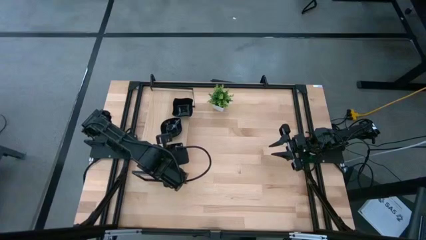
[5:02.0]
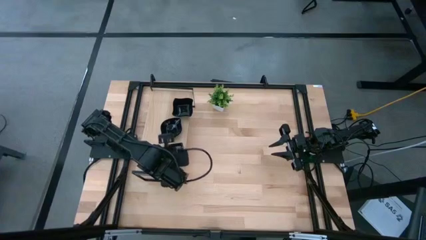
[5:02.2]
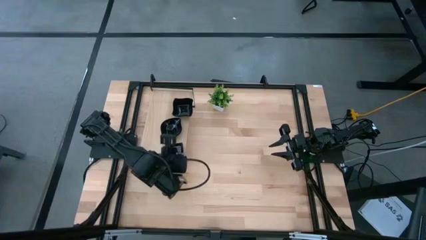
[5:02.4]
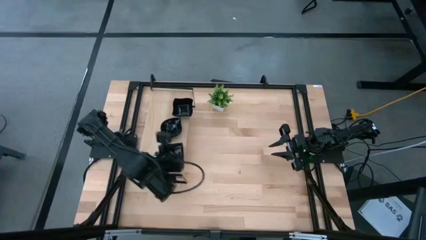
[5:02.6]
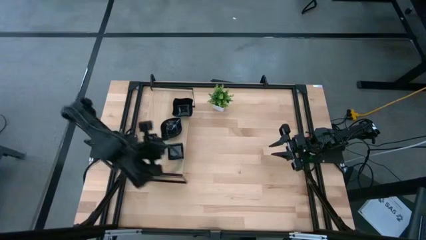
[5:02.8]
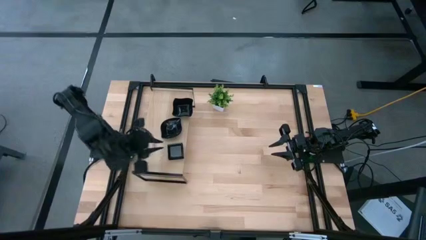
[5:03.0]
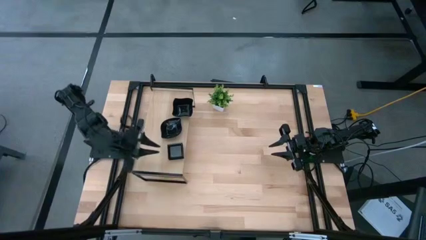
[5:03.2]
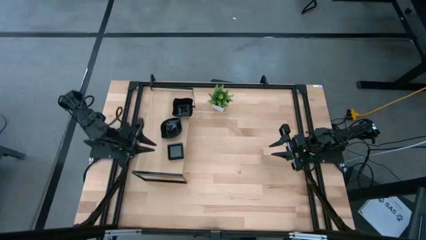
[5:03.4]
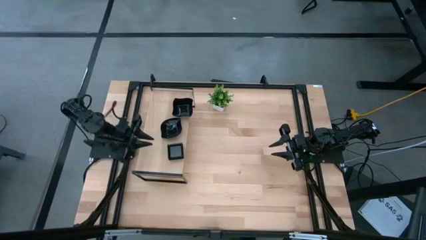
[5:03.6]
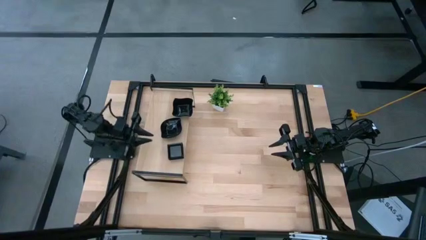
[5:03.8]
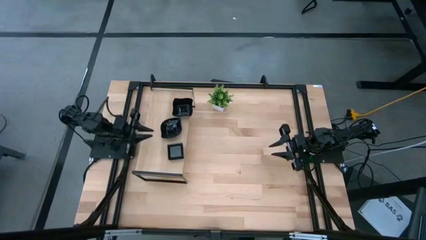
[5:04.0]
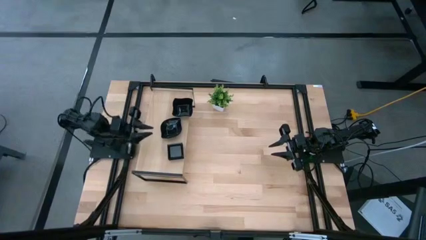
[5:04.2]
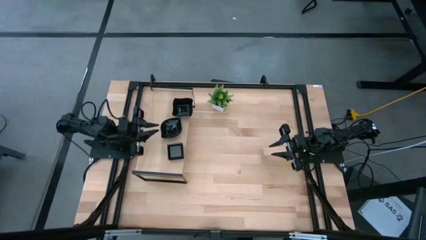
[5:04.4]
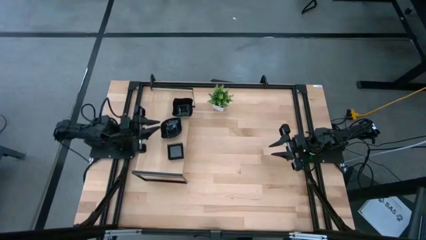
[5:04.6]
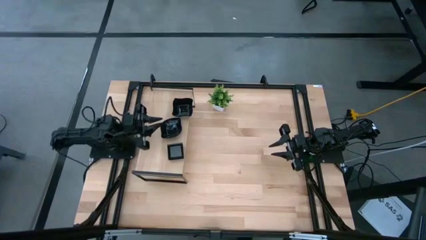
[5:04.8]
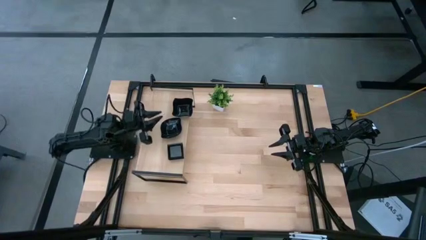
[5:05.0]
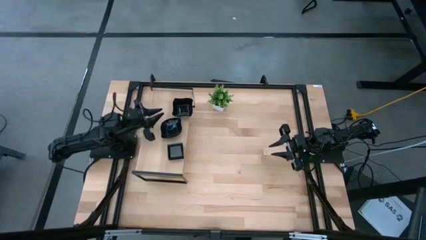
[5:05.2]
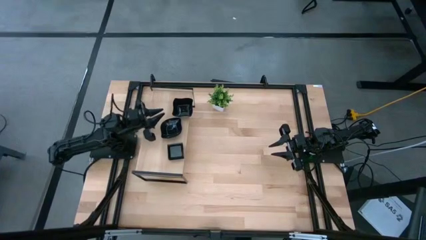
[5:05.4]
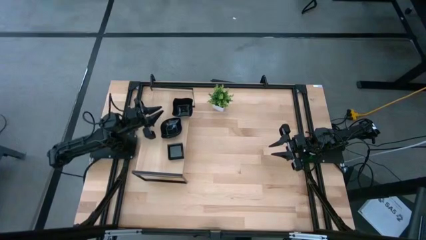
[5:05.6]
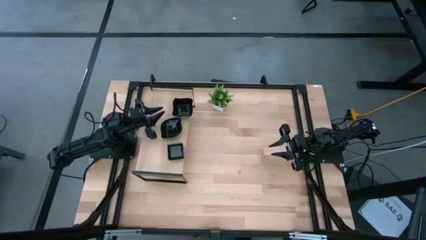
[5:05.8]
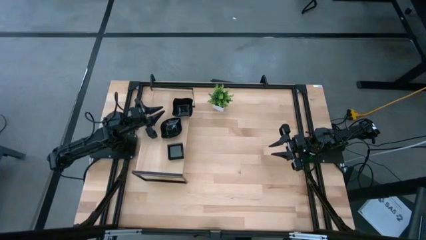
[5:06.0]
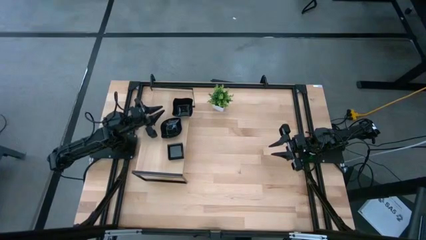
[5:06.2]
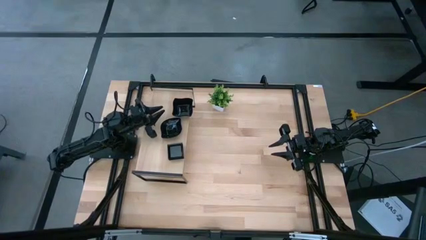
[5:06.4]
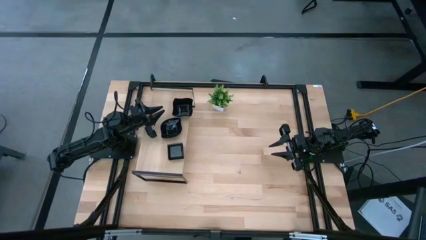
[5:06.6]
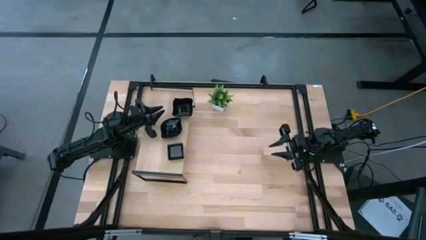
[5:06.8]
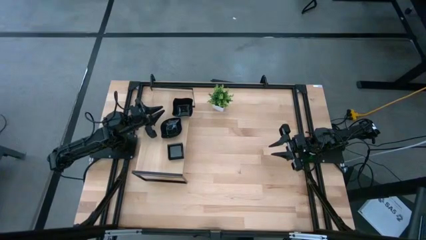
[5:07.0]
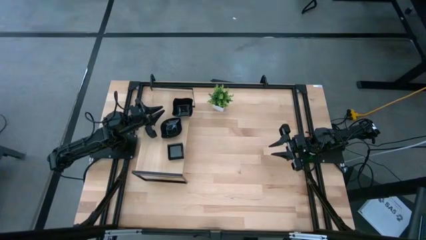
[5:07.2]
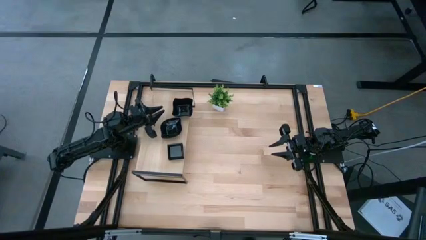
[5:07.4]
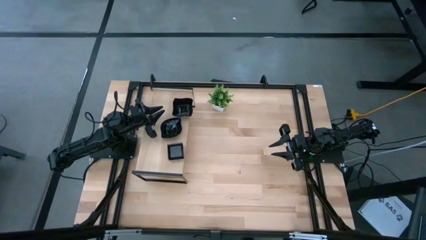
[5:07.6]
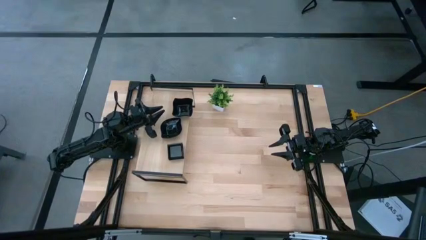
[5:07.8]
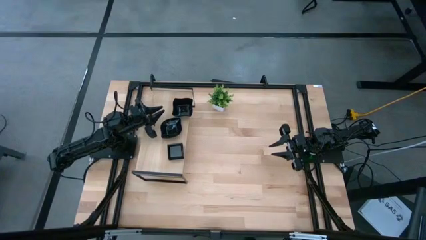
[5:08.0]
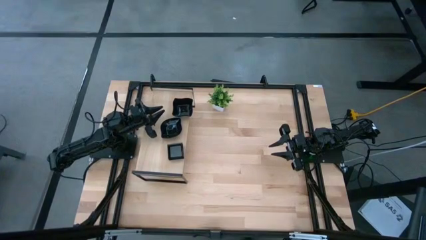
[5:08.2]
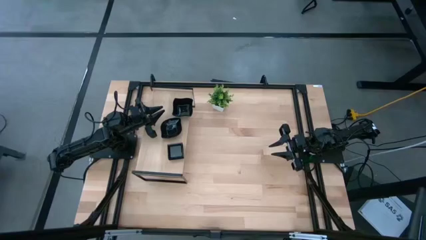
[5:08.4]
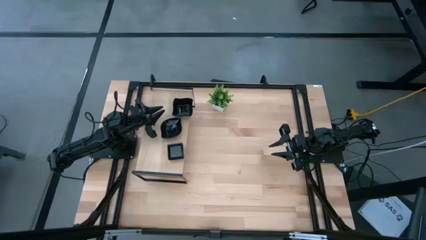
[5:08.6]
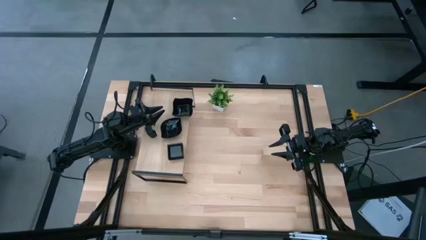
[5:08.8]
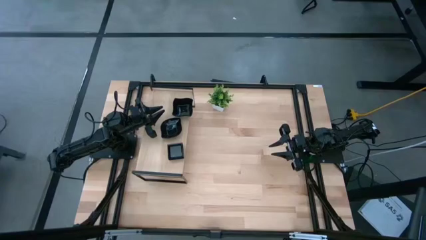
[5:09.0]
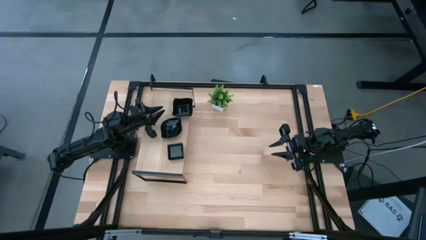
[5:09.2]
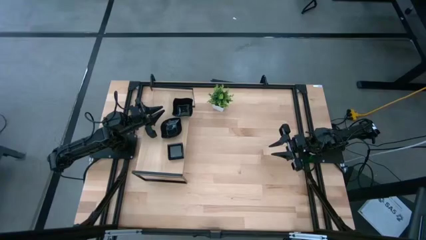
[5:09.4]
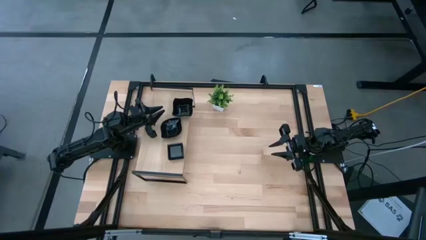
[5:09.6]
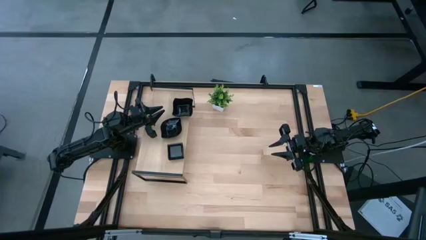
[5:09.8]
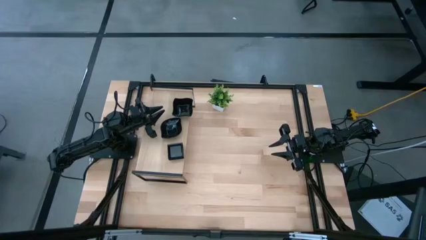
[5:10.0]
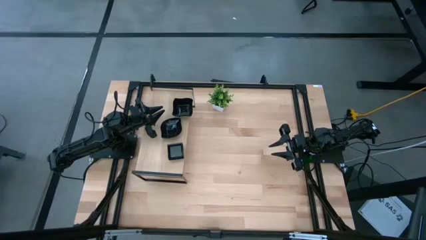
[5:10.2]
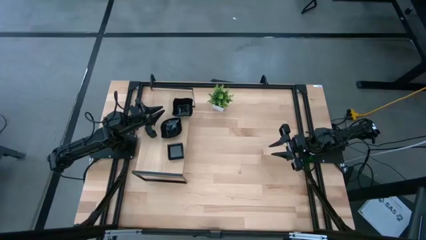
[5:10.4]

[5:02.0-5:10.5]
Task: Pick & Place Mini shaped plates
Return to Home Position

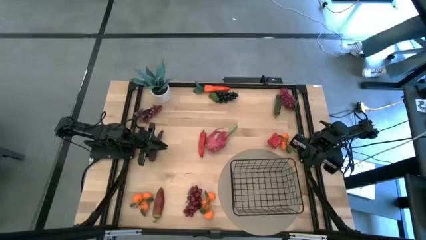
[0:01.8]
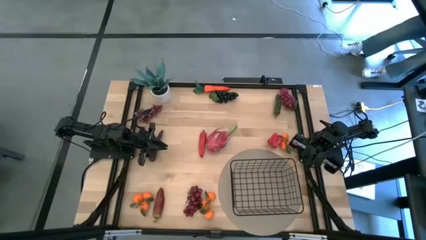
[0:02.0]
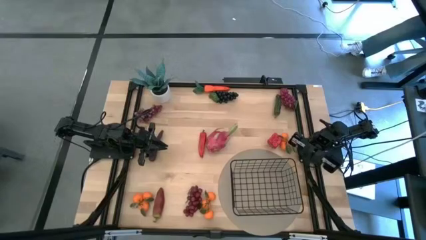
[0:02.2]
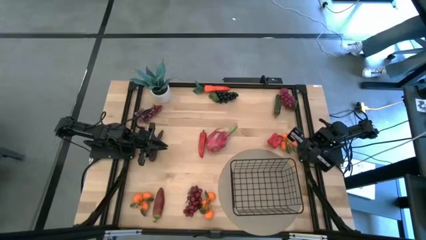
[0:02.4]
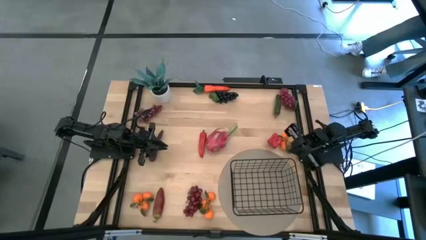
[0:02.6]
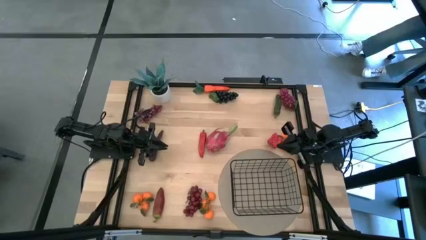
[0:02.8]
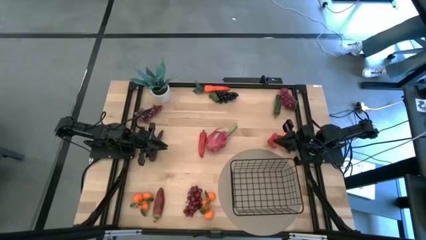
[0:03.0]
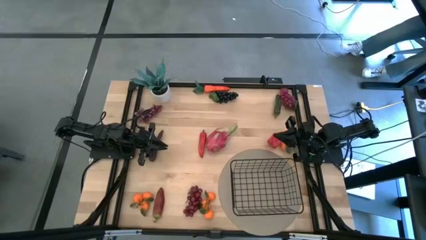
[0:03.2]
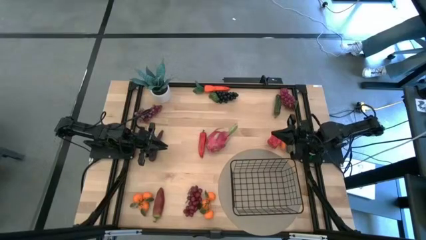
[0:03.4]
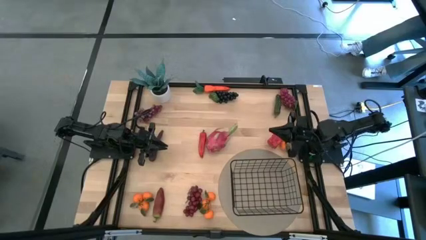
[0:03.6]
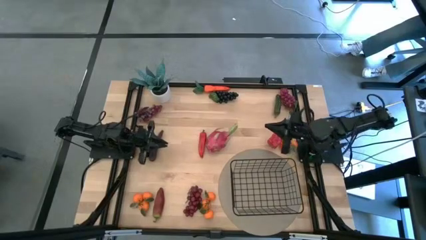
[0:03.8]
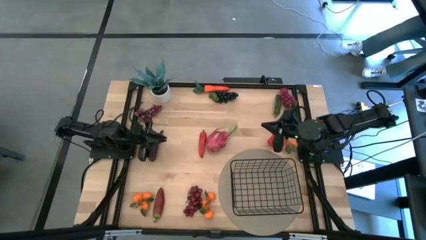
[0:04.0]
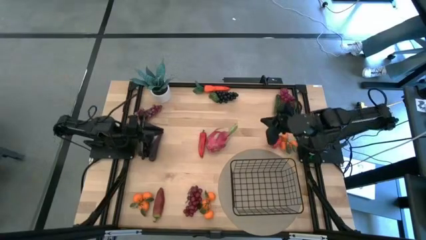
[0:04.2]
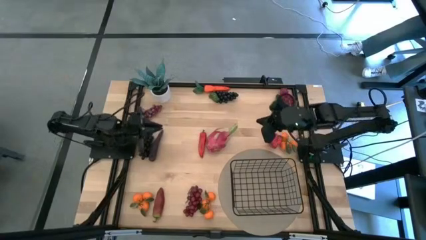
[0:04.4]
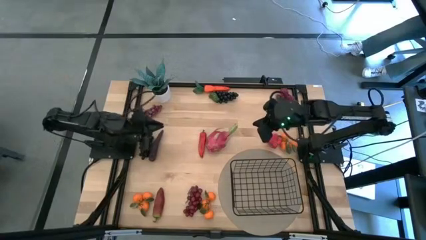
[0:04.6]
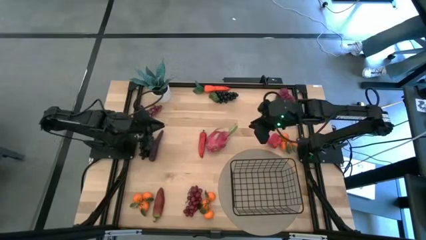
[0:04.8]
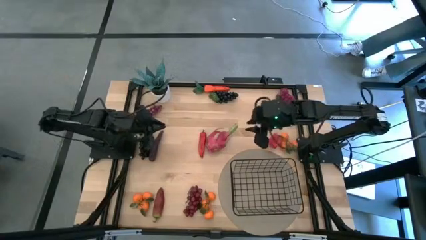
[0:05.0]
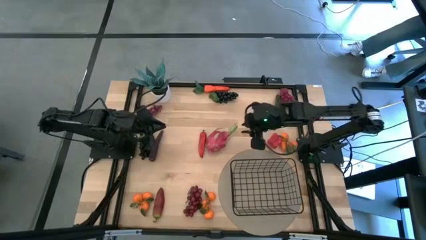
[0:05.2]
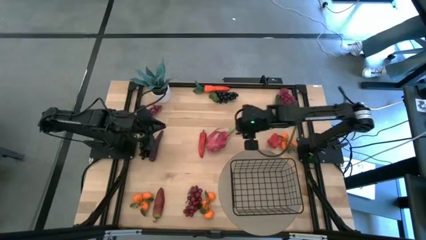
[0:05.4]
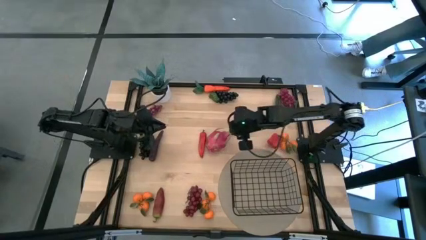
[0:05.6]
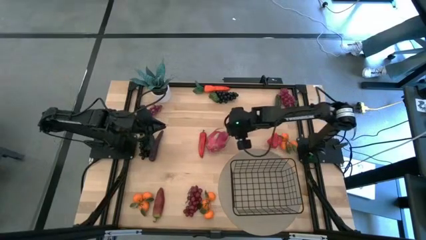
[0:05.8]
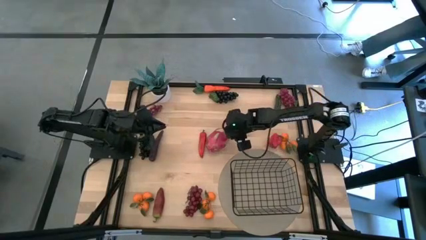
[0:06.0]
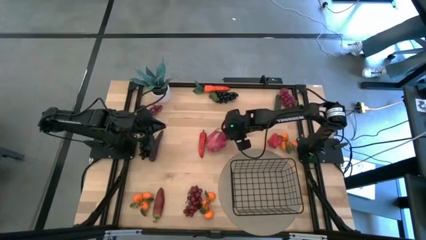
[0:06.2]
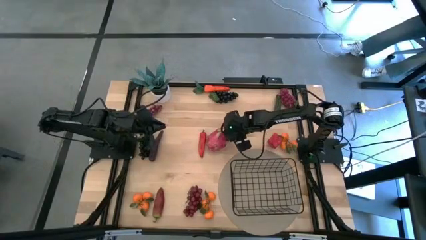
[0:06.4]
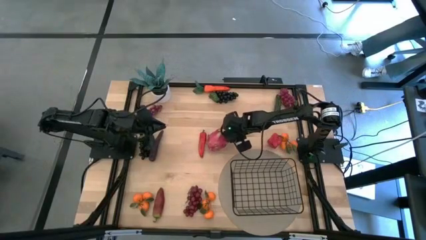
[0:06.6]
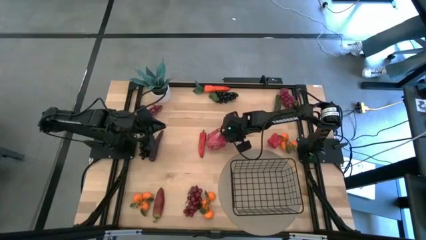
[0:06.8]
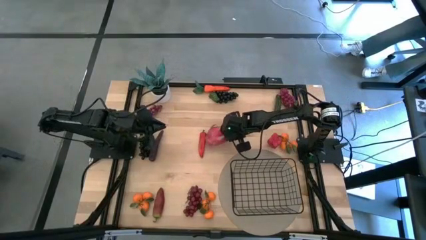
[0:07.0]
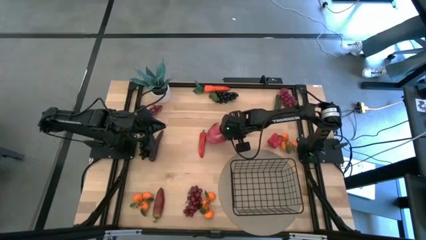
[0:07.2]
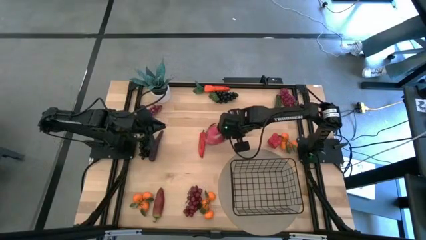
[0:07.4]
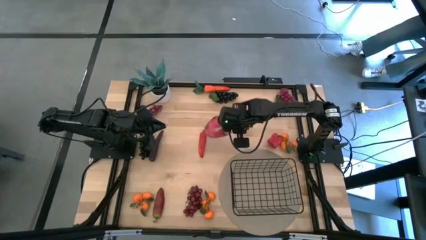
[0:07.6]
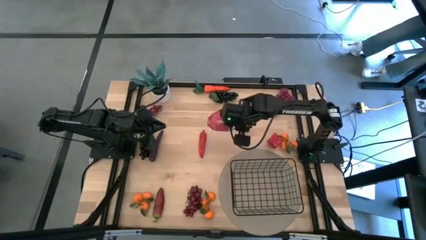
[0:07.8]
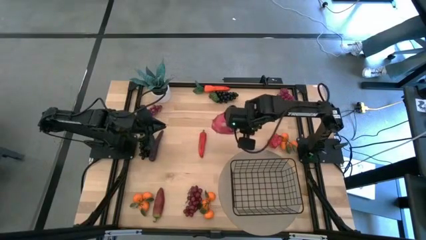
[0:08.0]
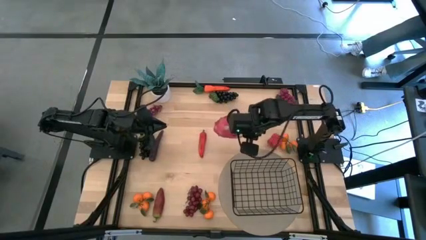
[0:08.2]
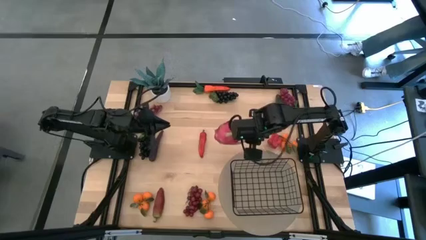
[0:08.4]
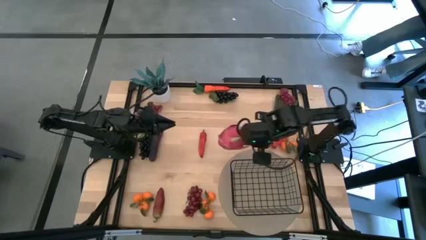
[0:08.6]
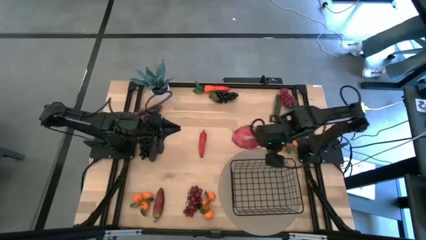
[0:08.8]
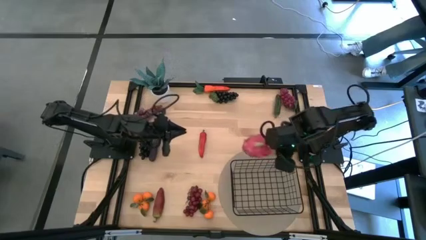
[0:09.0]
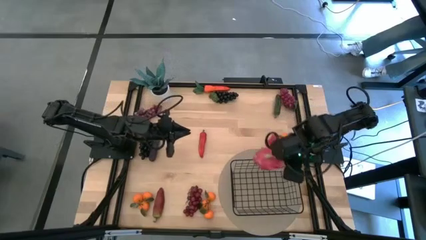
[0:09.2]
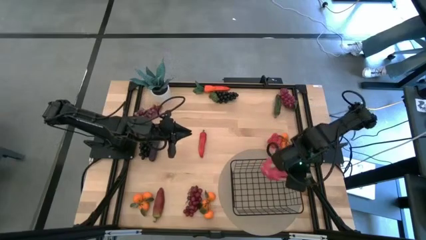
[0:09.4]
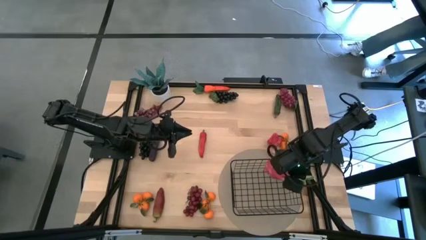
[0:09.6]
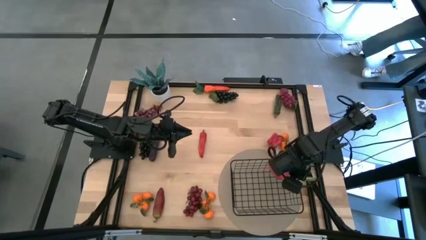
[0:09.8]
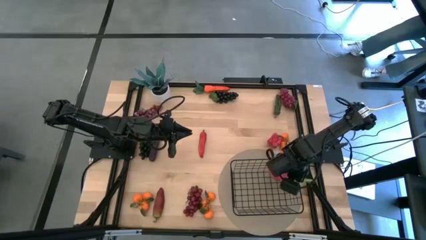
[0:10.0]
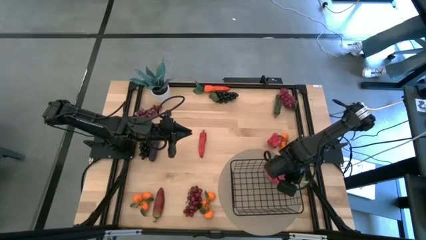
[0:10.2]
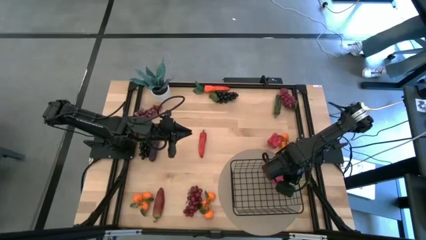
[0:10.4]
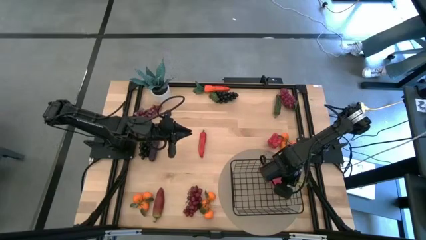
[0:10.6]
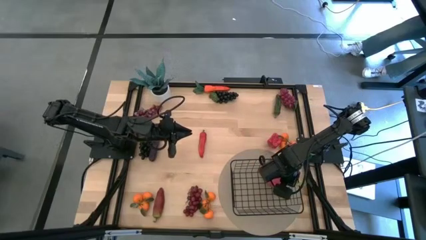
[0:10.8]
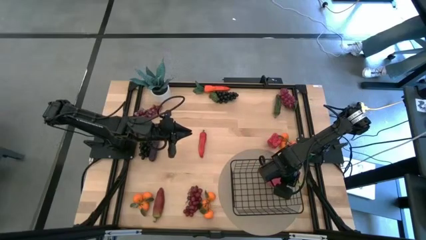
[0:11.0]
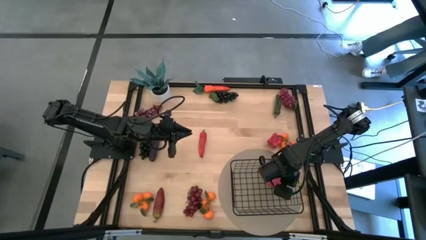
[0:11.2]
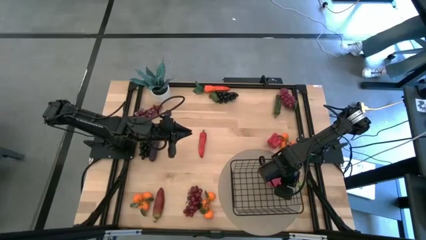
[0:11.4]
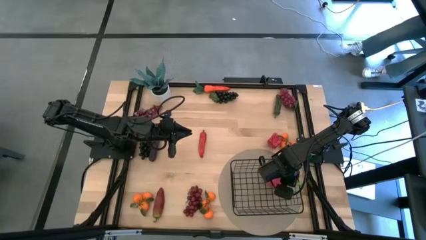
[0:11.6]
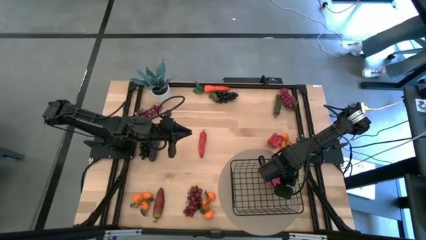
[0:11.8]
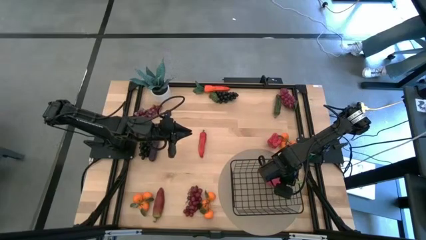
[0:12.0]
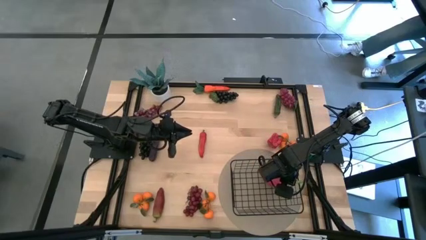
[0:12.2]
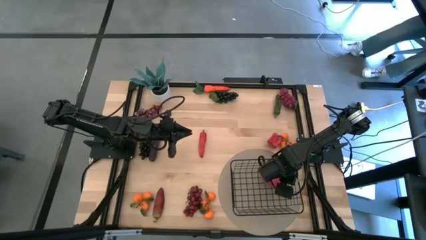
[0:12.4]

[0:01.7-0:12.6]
Task: Build produce basket
Put the dragon fruit into the wire basket
